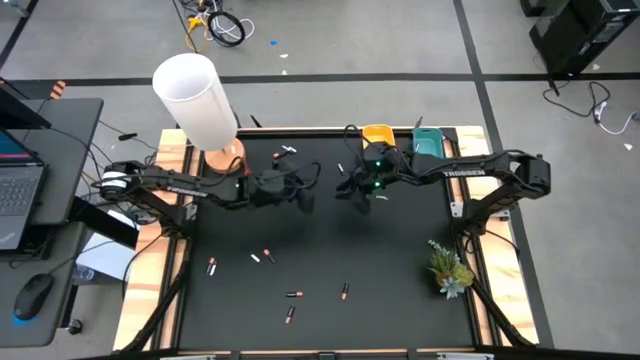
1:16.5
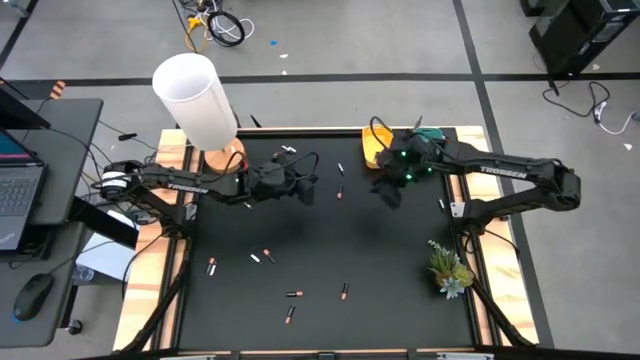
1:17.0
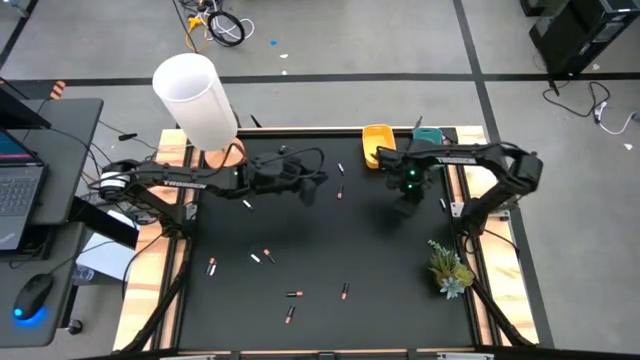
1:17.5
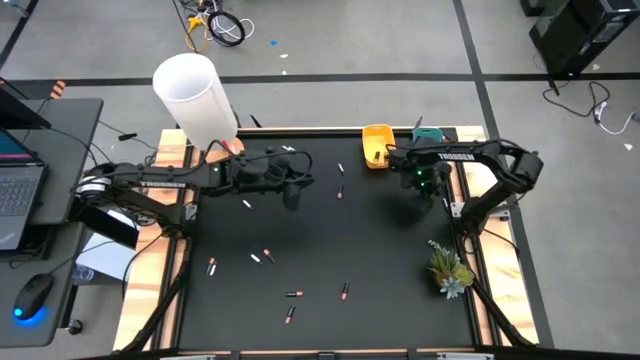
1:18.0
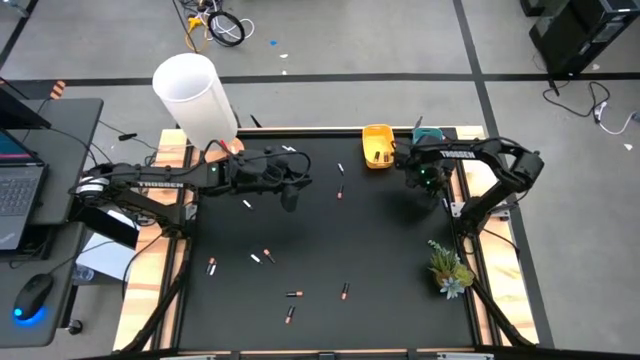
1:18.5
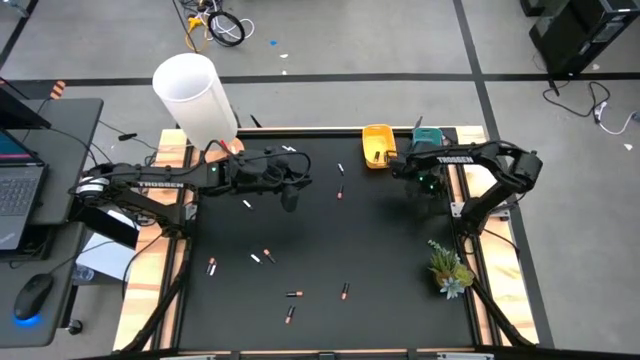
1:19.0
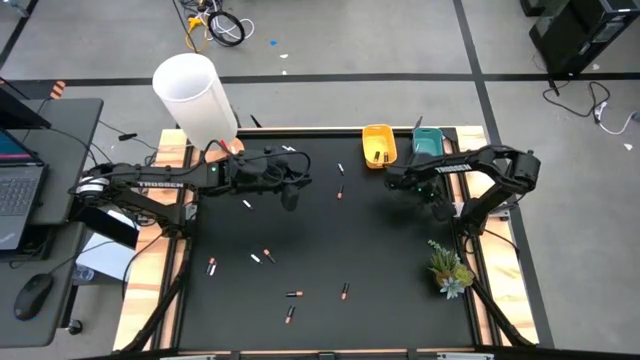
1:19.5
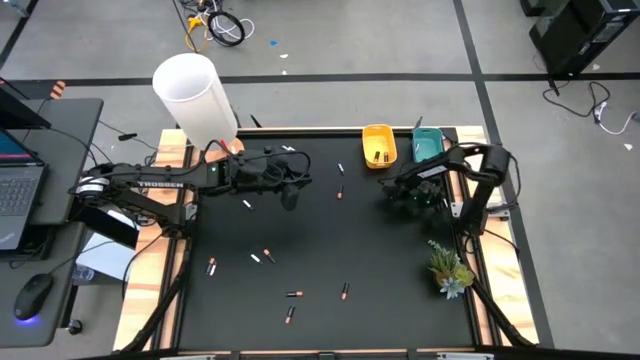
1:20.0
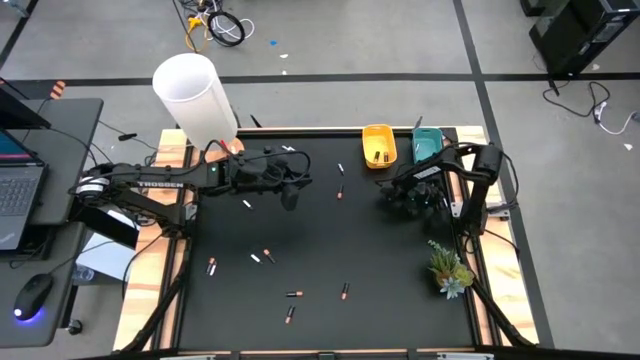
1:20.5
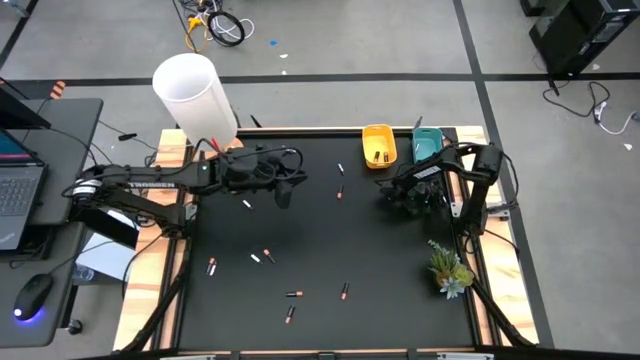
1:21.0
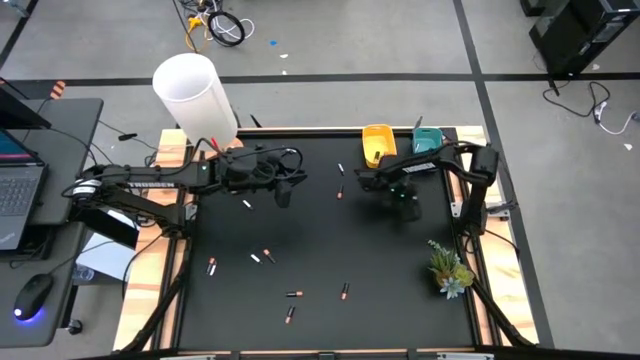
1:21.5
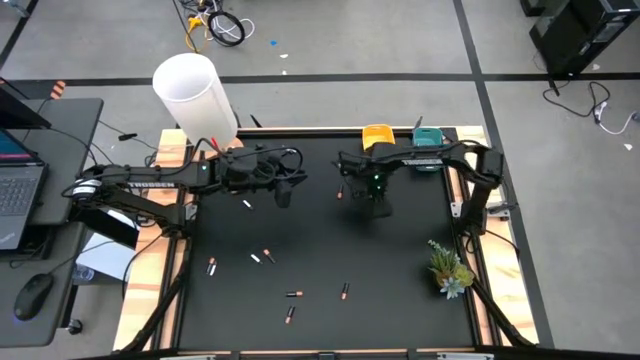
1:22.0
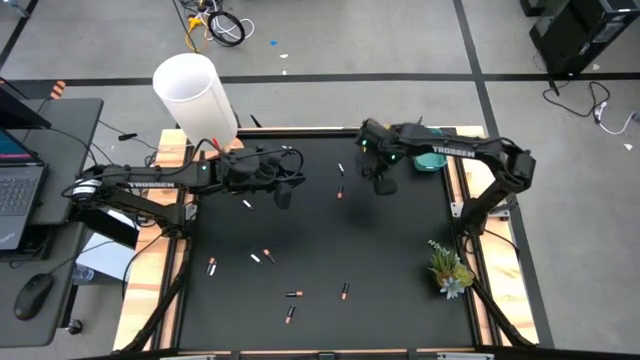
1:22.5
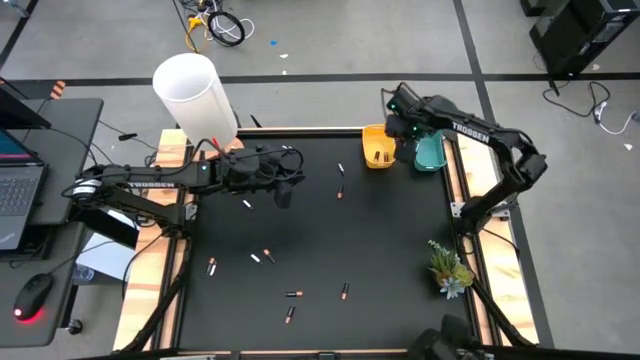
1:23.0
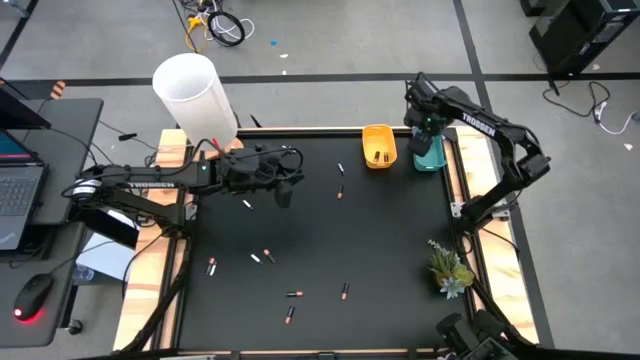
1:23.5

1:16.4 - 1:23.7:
Task: Sort batteries
Put the silver battery into the blue bin

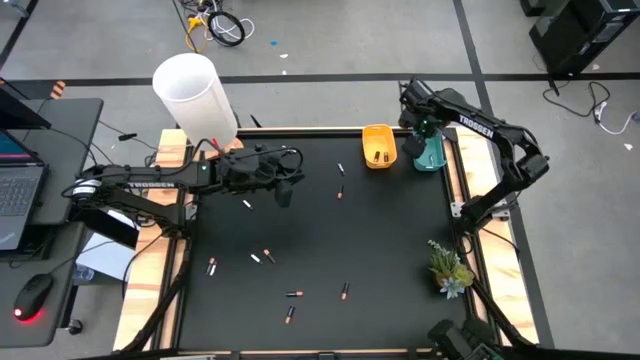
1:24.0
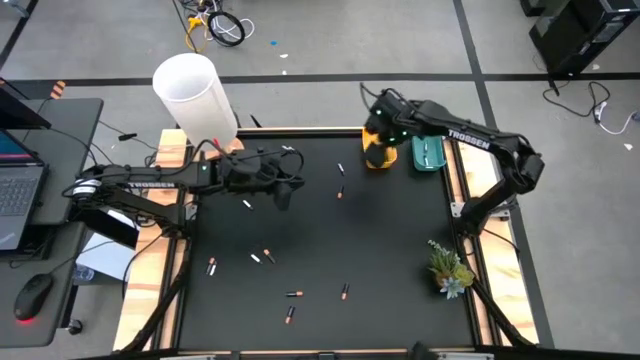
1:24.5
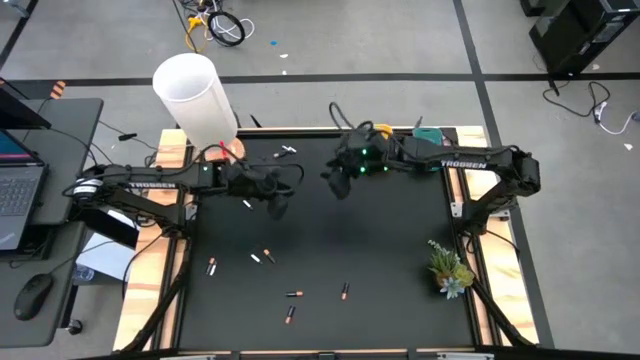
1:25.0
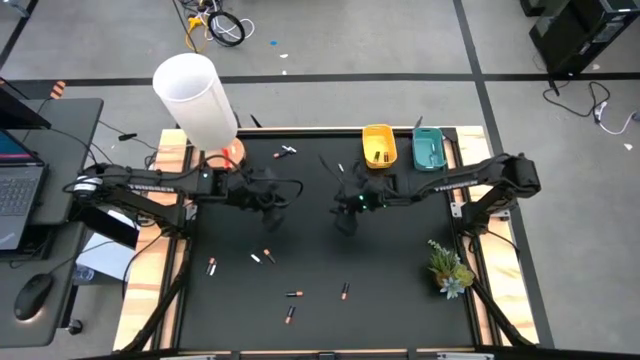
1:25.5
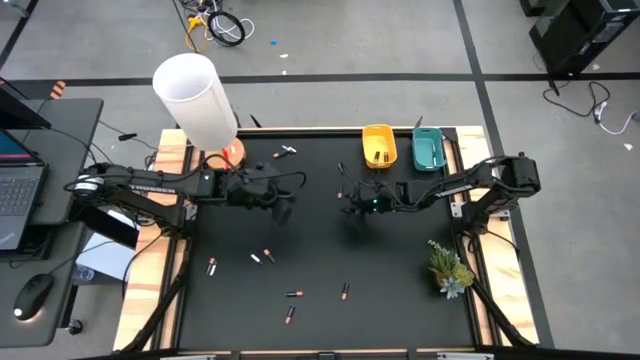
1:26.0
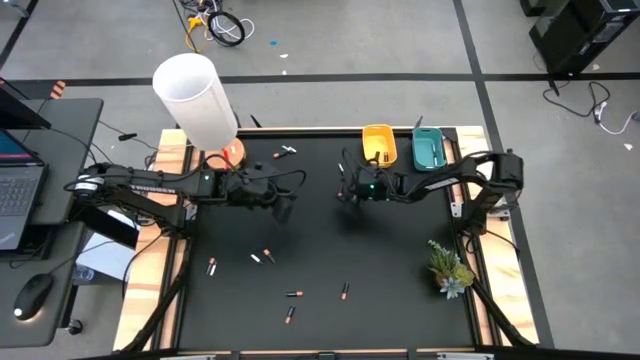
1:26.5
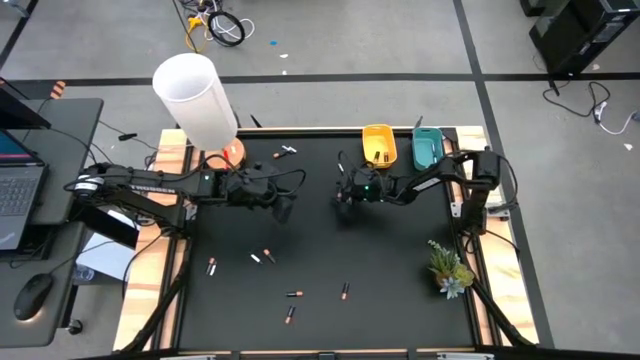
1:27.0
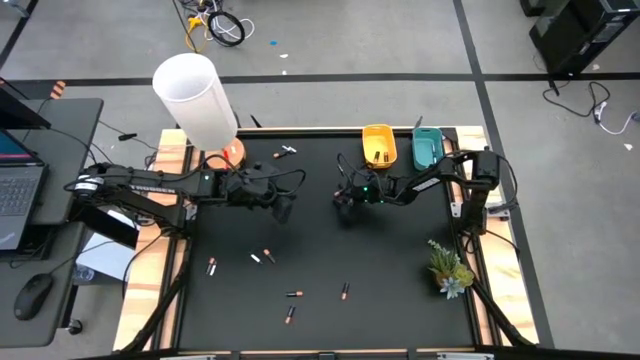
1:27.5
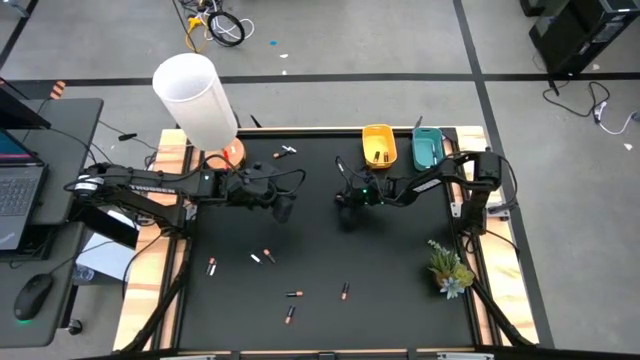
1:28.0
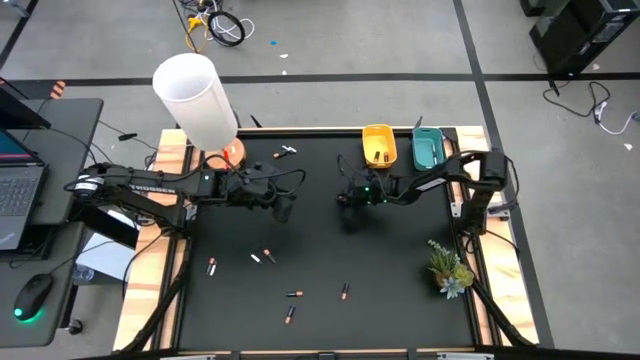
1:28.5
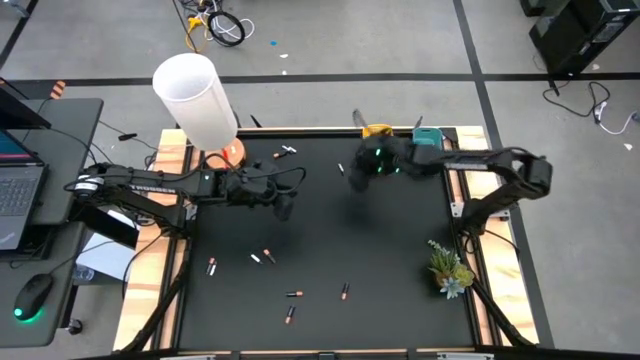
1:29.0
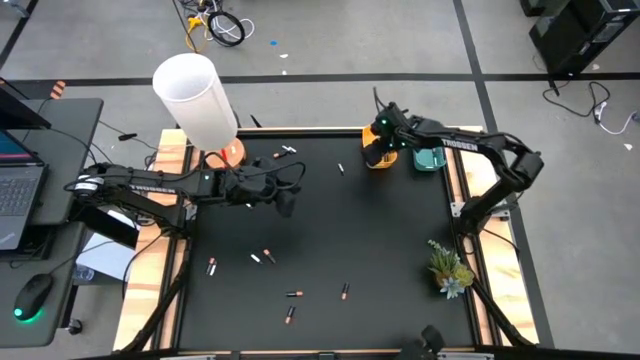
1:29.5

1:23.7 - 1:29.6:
Put the black battery into the yellow bin

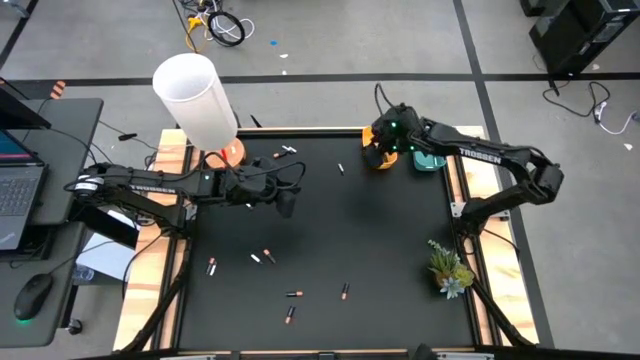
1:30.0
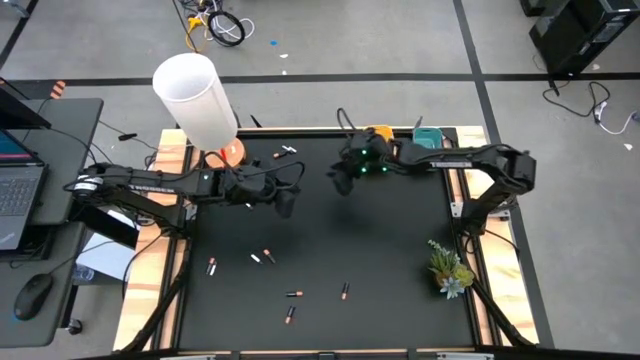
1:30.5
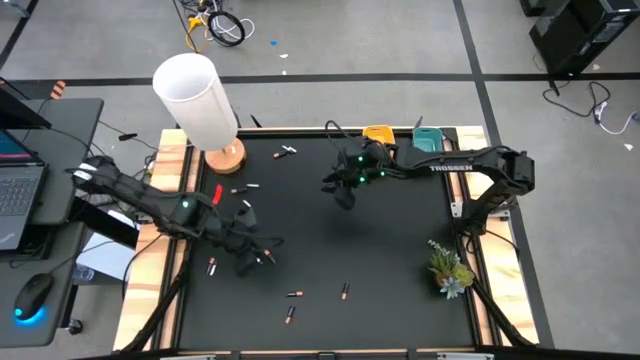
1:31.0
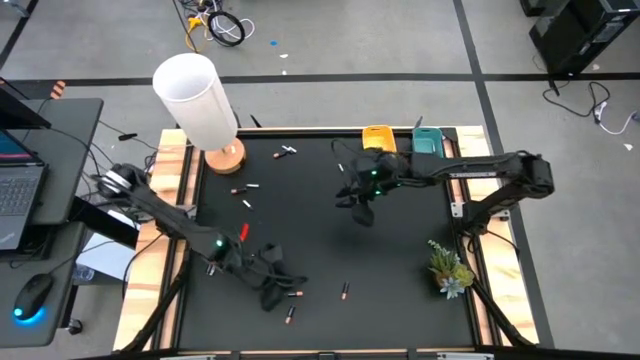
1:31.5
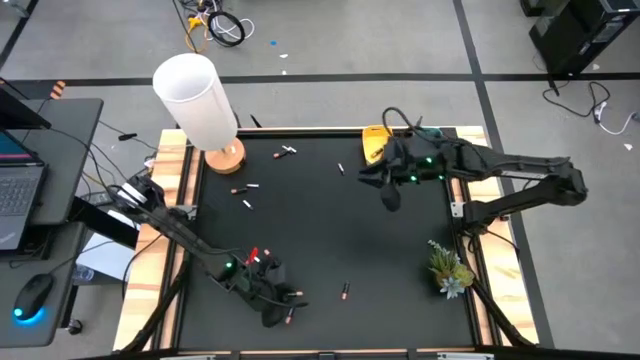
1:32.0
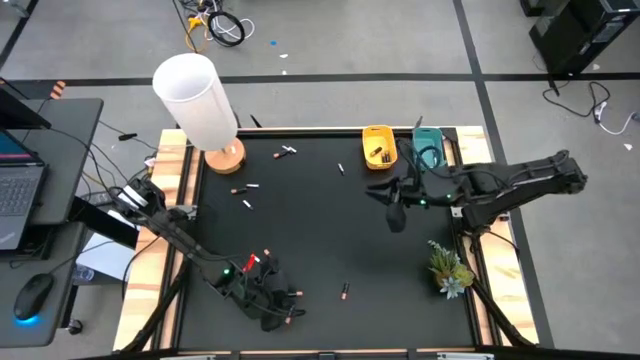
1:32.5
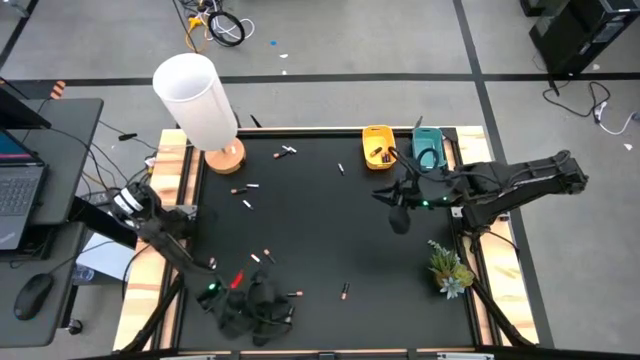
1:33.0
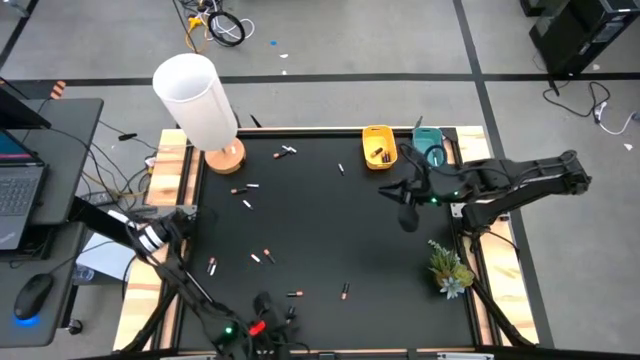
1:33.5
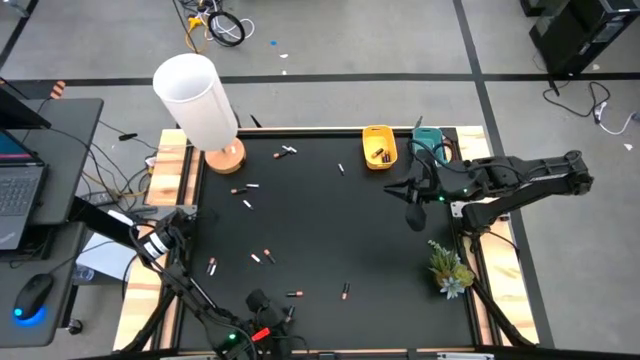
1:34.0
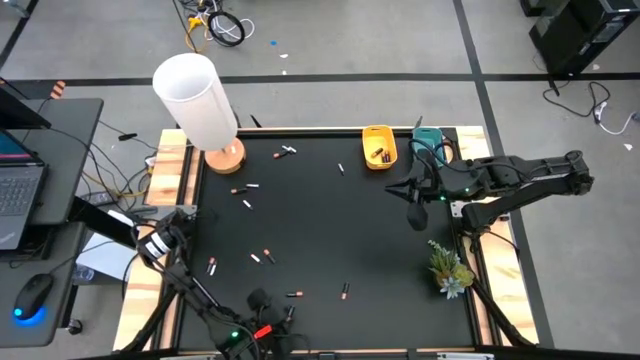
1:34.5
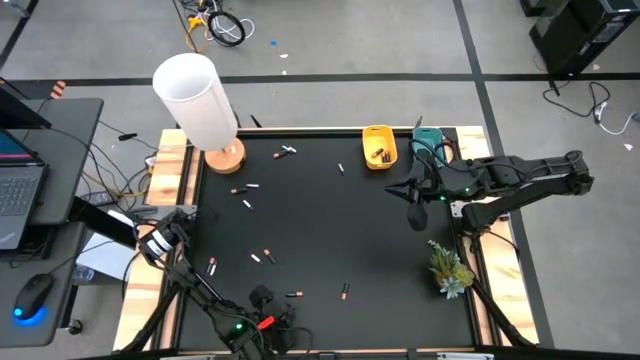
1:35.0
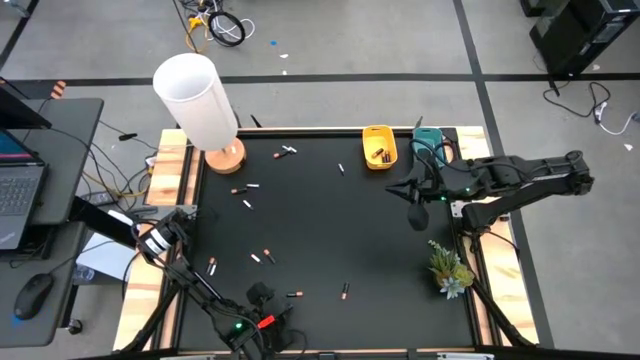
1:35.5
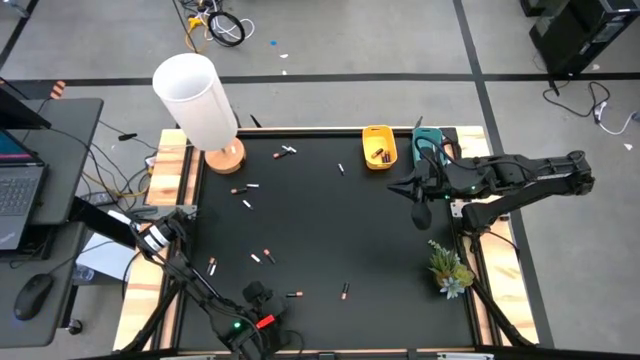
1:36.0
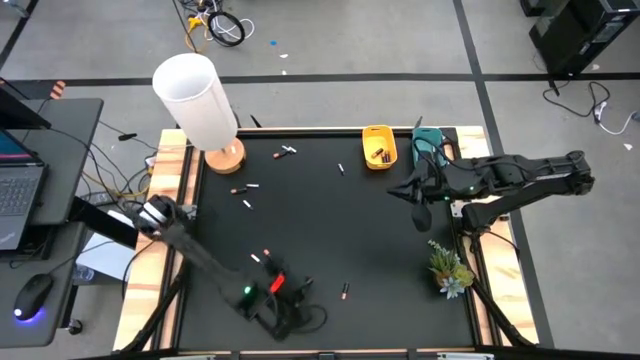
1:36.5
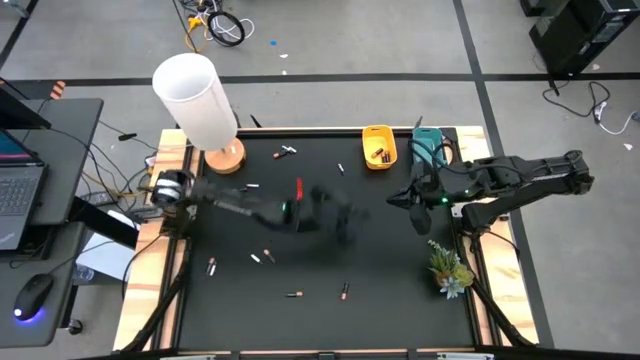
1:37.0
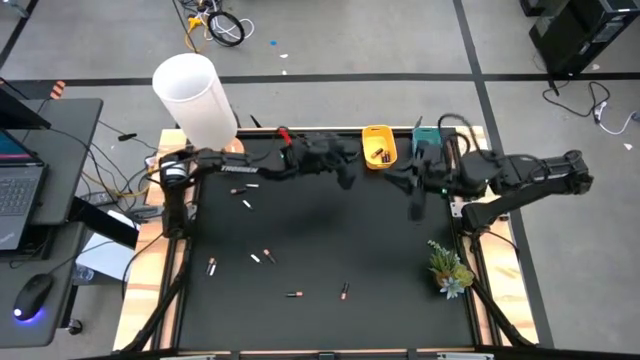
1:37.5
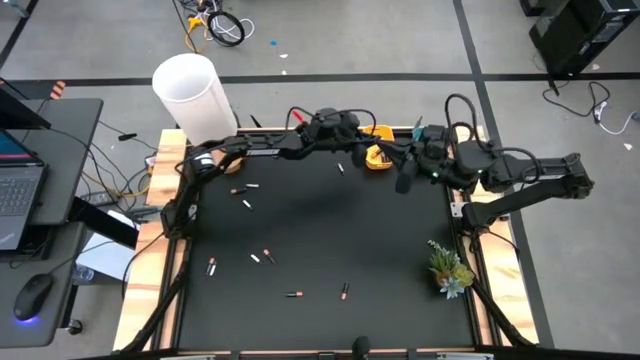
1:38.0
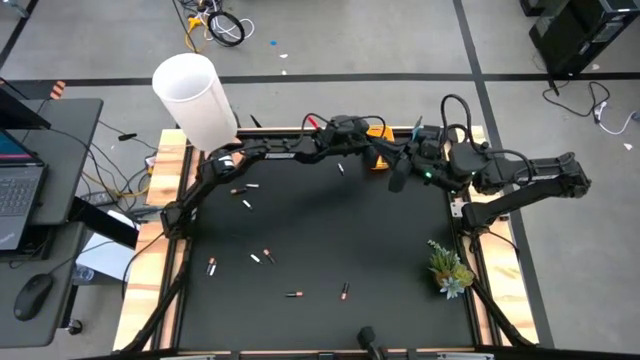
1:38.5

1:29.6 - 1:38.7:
Put the black battery into the yellow bin
